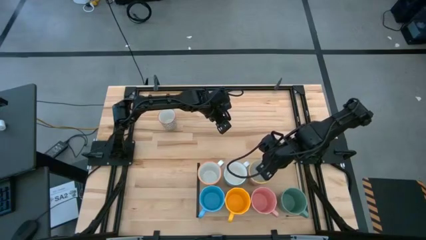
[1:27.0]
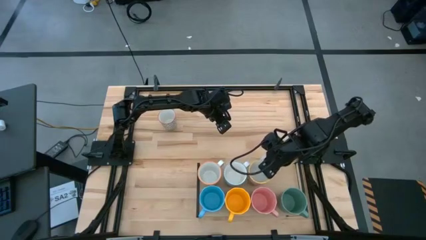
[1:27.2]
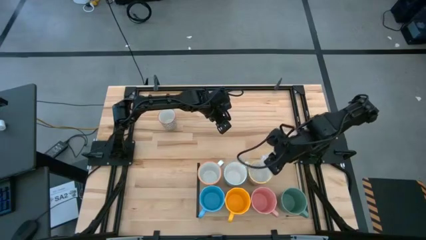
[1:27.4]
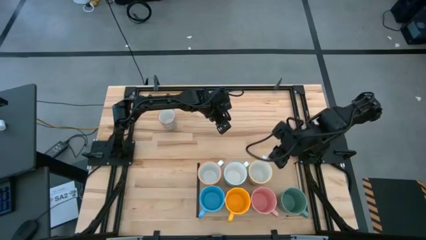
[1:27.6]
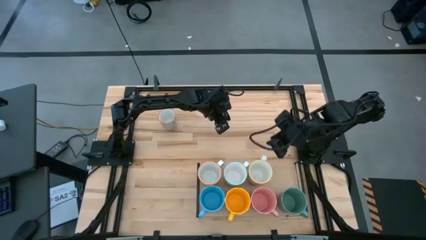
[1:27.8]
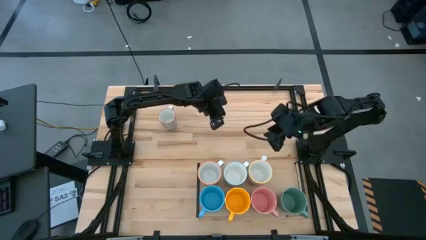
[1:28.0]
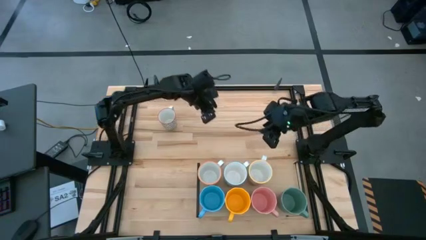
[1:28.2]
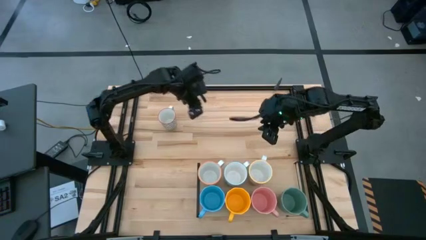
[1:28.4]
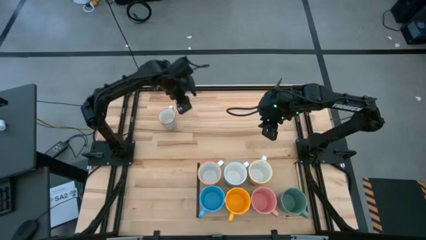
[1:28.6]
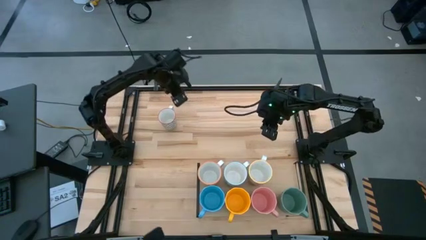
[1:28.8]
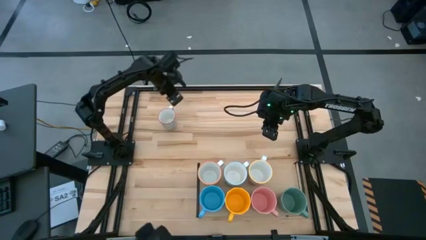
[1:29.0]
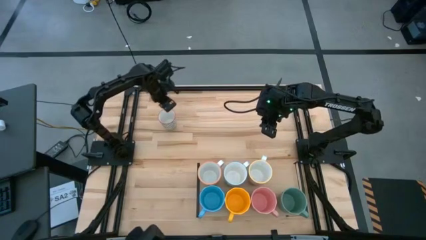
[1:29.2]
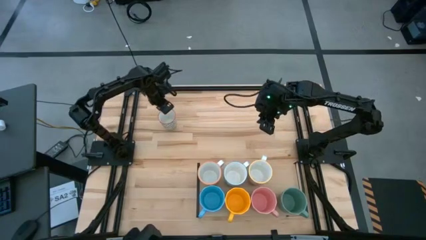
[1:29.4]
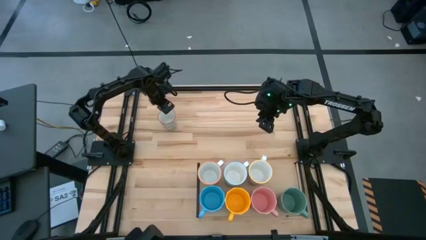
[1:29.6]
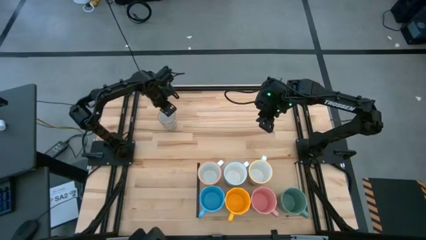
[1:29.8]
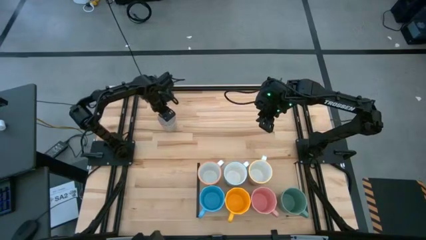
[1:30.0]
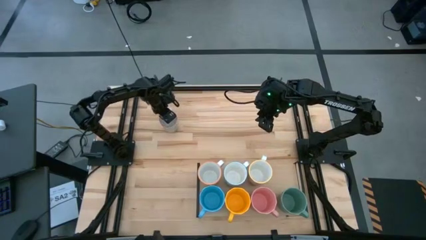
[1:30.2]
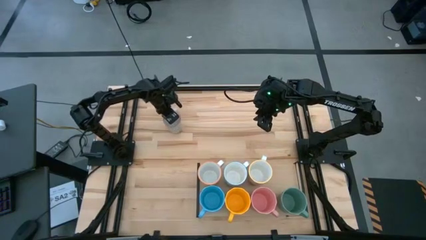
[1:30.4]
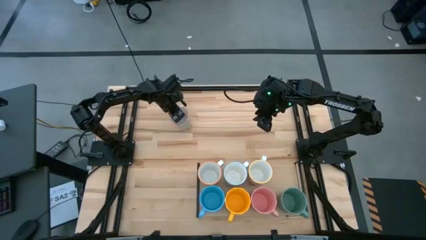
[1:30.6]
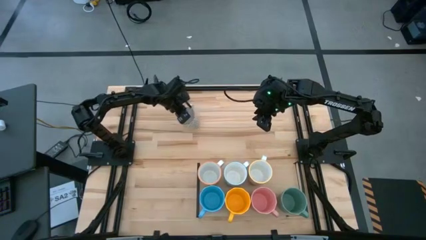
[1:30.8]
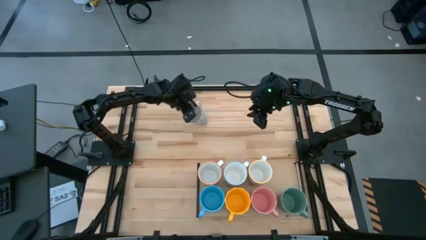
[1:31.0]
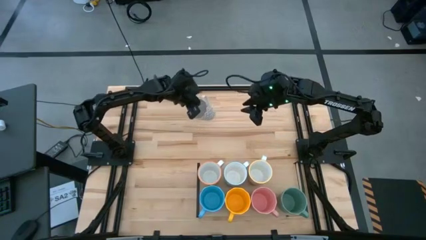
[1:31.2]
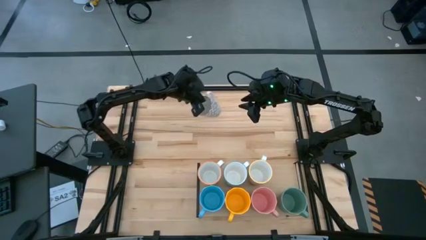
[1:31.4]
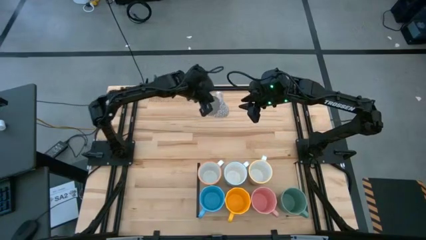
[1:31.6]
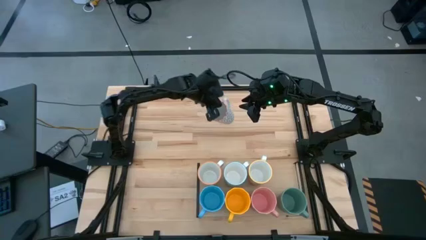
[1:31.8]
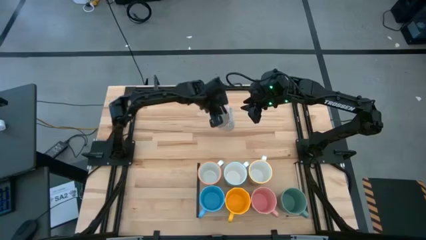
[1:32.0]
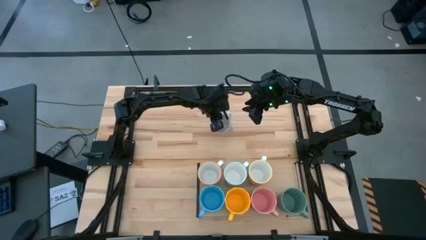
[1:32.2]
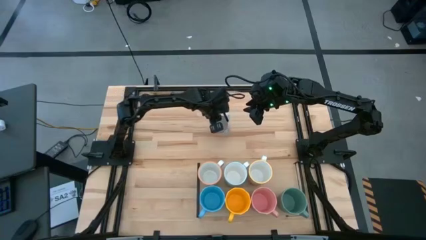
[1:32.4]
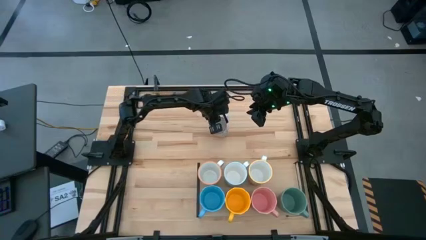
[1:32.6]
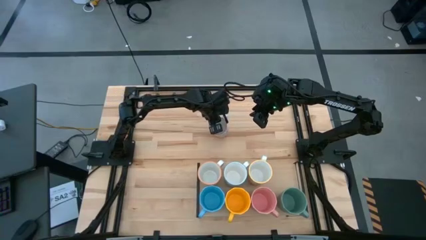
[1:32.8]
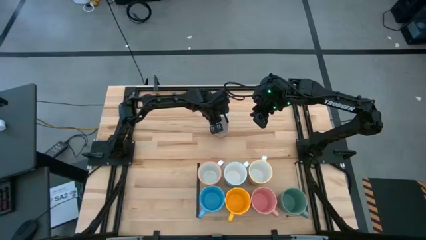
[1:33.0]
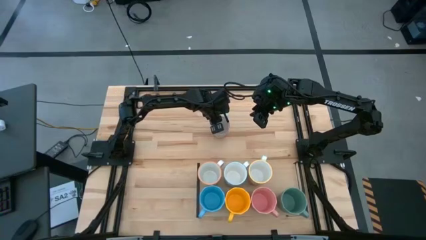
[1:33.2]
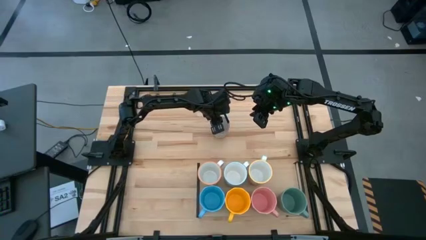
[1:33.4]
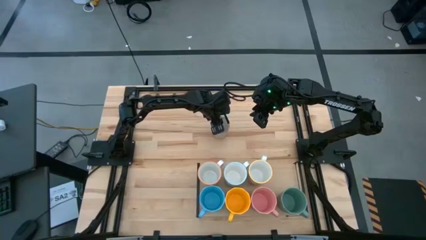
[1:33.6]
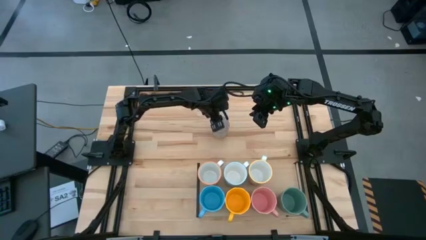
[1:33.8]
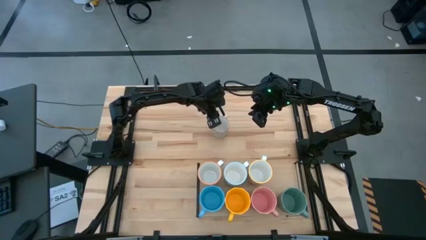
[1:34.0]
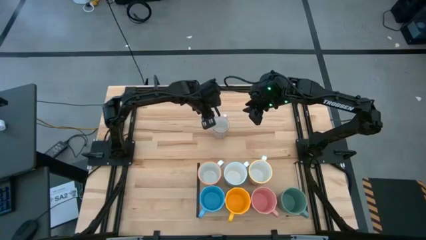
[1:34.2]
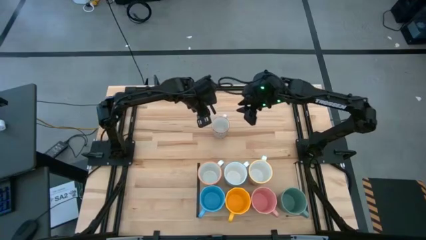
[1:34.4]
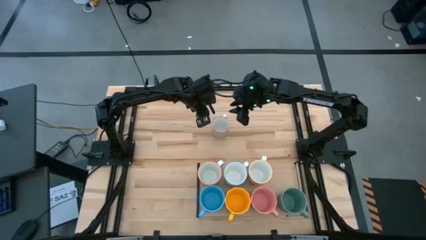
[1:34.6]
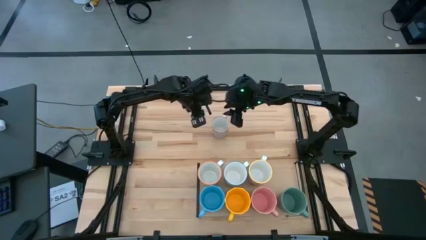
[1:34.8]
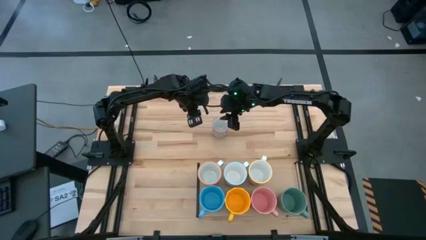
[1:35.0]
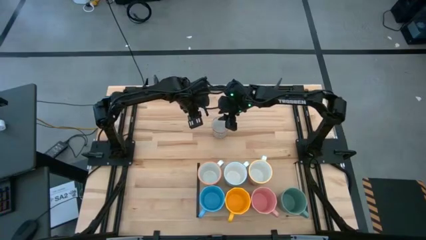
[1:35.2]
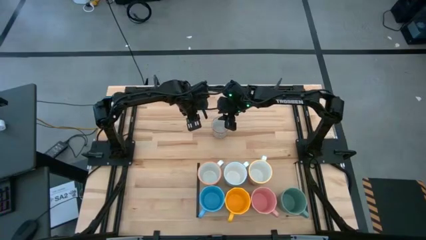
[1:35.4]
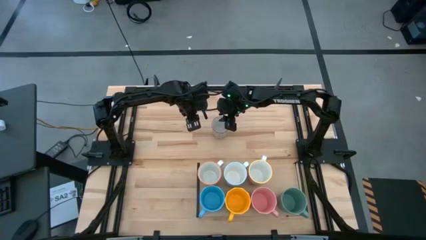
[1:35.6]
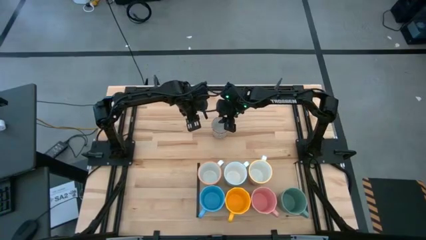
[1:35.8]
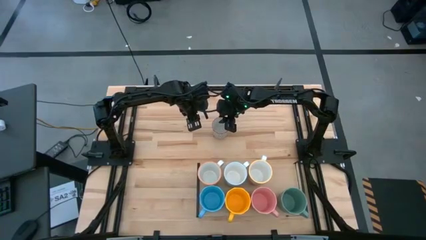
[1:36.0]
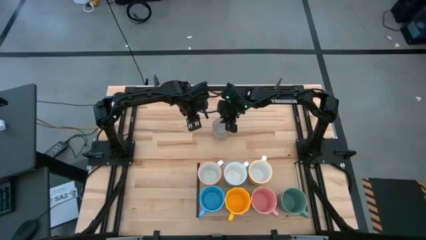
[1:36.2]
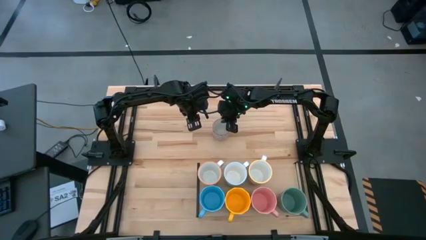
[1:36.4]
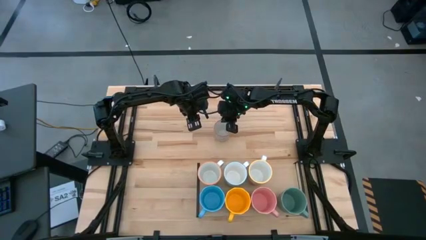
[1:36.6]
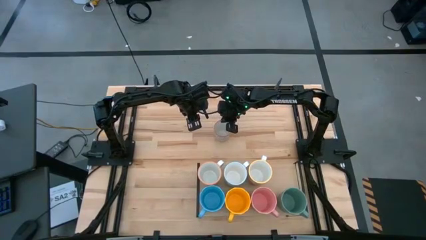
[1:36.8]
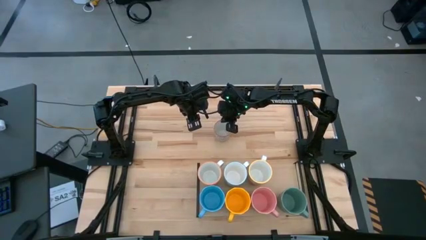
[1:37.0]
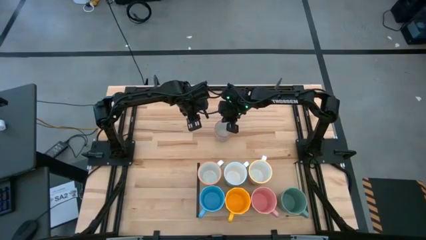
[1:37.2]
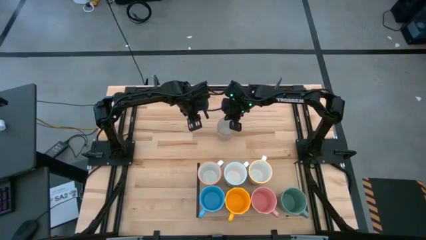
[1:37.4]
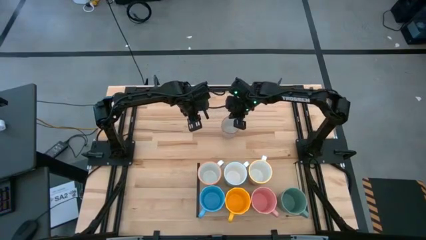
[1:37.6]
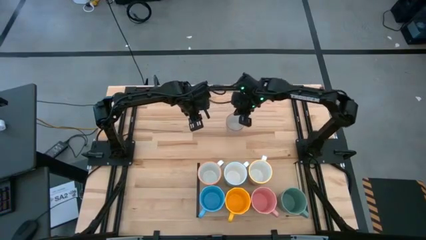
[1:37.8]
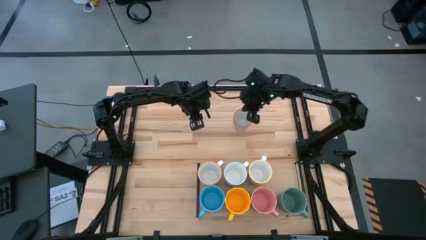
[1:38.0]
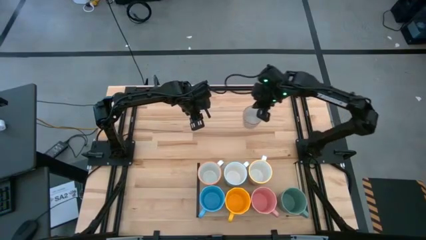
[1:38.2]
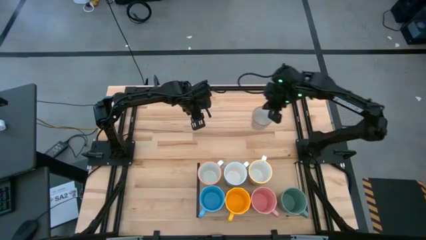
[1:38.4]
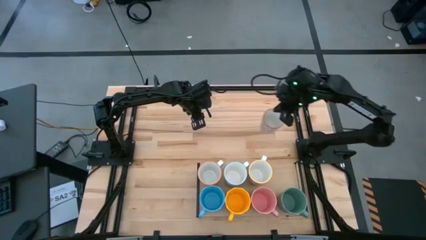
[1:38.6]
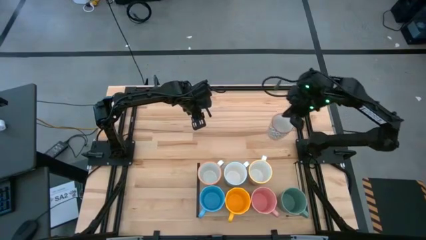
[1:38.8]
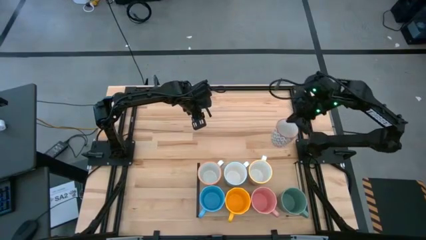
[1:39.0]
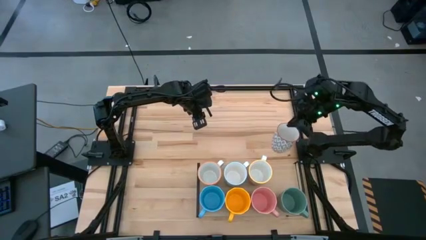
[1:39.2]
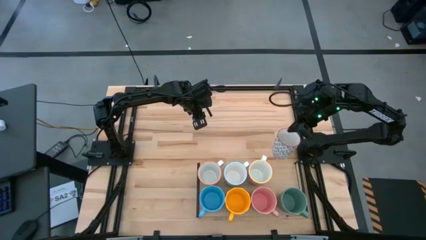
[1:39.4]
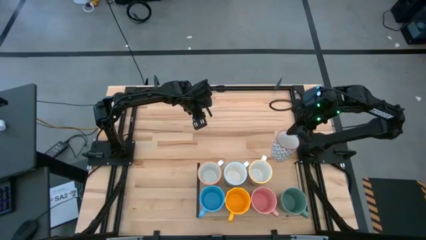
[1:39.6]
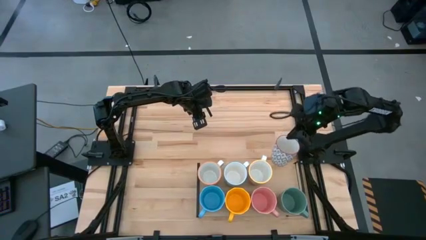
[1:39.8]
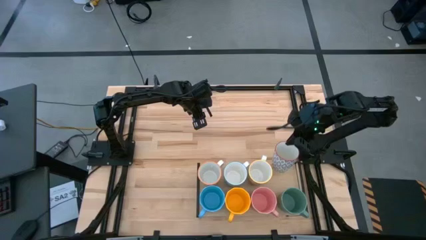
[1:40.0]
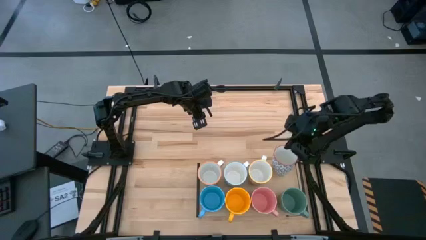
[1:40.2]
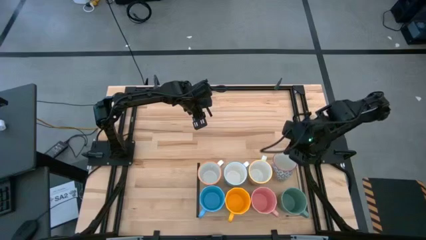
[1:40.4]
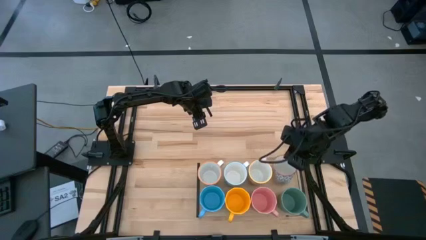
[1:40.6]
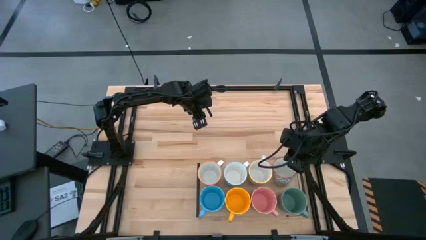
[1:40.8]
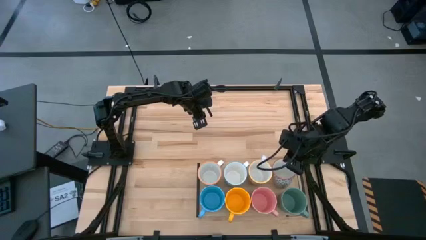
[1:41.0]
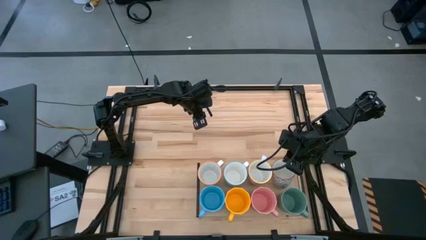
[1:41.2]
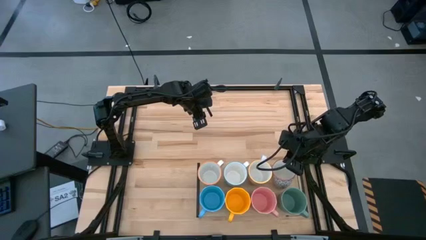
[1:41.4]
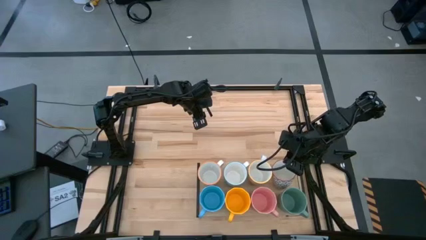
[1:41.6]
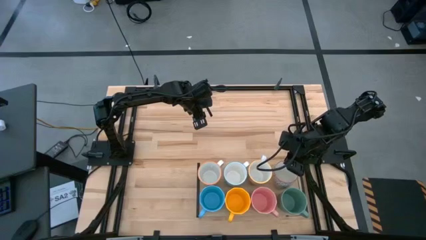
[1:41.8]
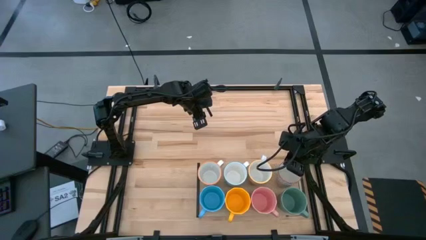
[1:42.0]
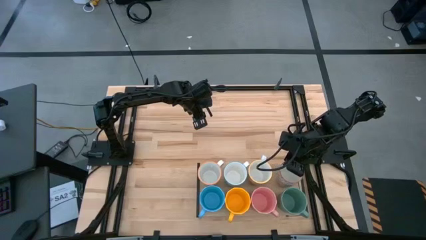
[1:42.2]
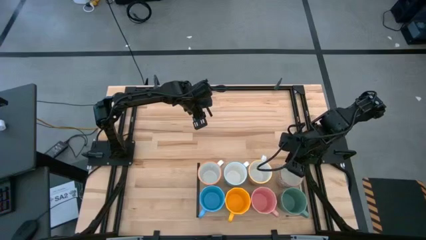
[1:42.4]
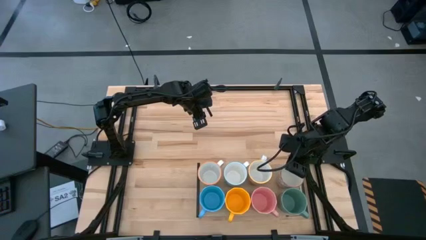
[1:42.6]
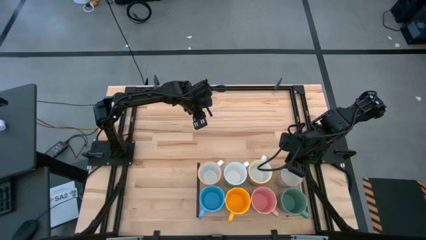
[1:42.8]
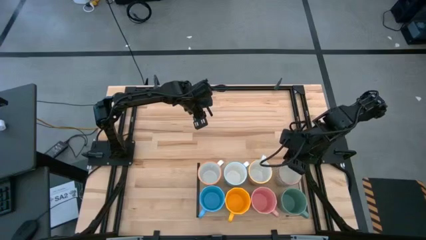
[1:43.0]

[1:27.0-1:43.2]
Task: Place coffee mugs
Put the gray patterned mug on the shelf
